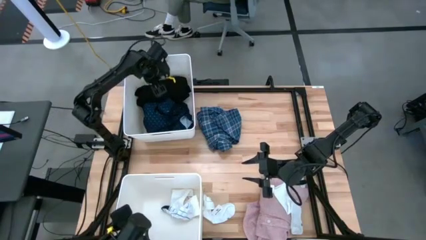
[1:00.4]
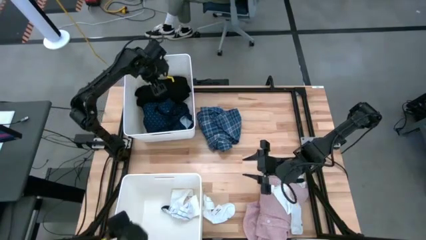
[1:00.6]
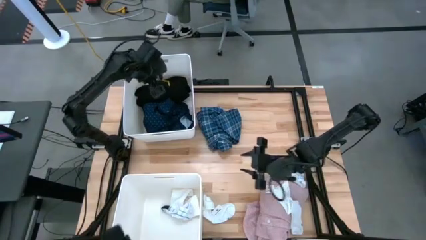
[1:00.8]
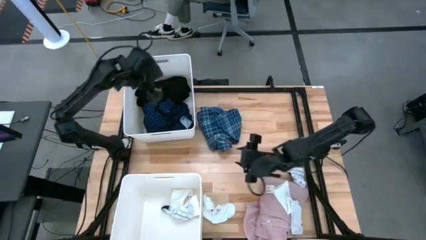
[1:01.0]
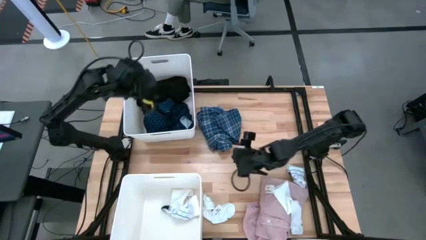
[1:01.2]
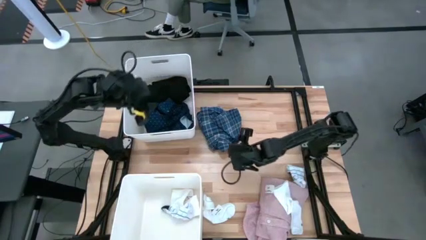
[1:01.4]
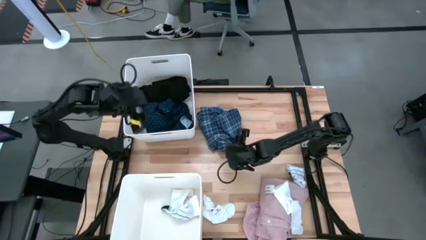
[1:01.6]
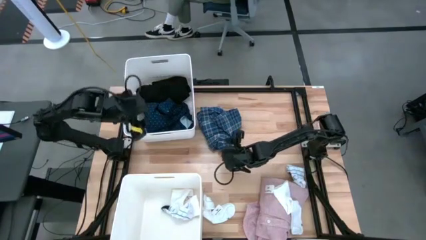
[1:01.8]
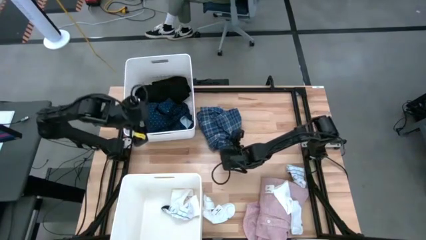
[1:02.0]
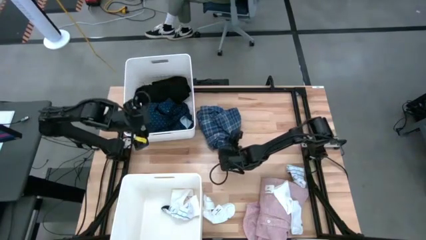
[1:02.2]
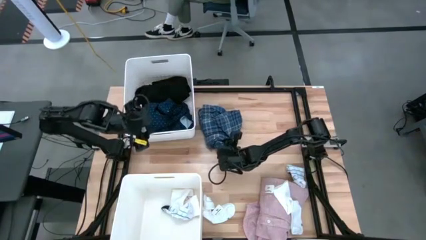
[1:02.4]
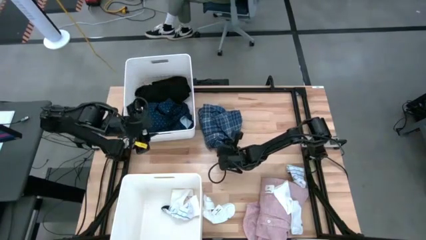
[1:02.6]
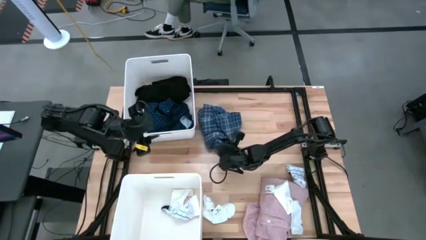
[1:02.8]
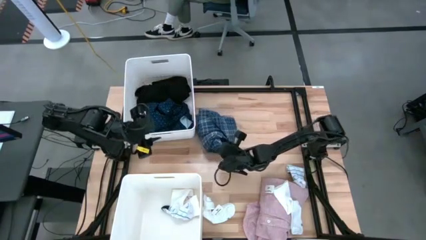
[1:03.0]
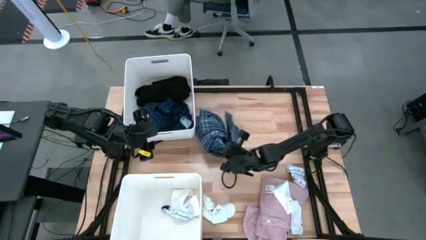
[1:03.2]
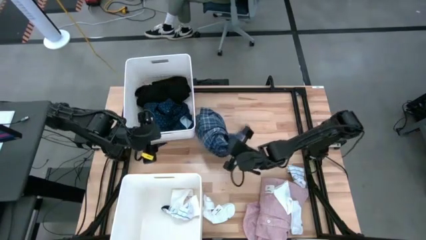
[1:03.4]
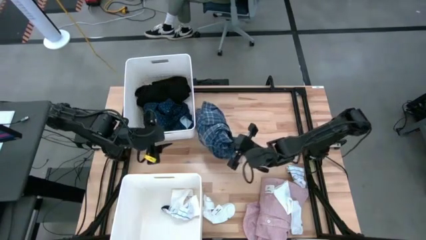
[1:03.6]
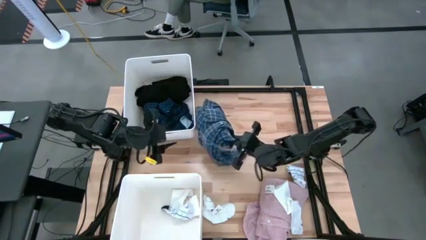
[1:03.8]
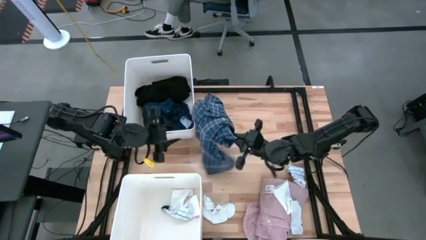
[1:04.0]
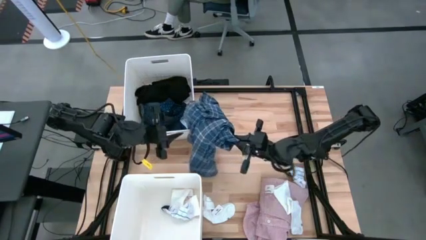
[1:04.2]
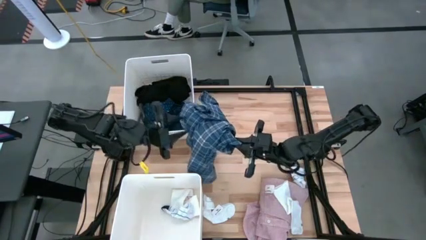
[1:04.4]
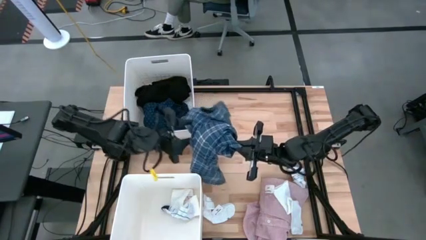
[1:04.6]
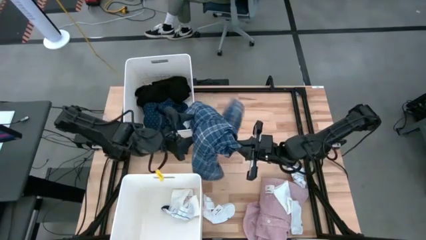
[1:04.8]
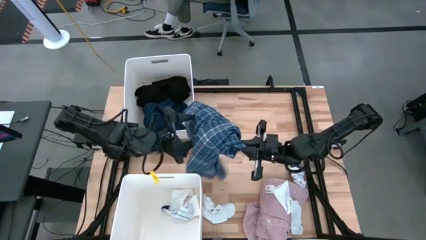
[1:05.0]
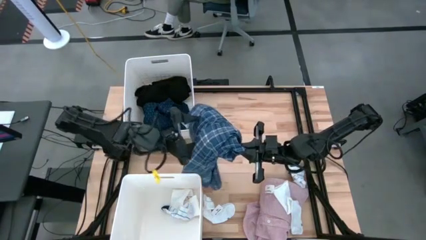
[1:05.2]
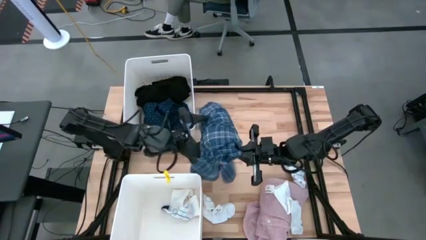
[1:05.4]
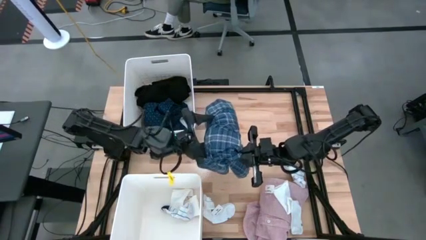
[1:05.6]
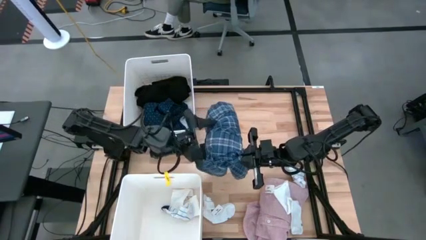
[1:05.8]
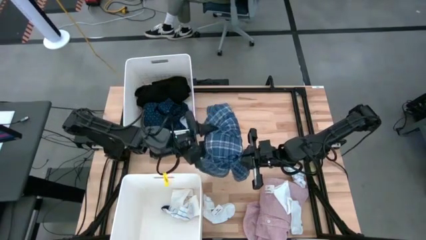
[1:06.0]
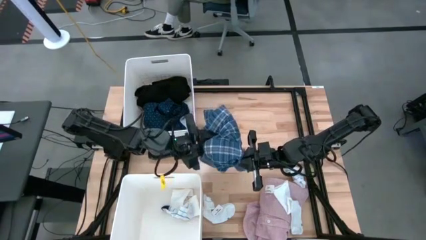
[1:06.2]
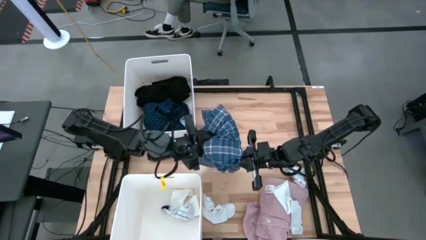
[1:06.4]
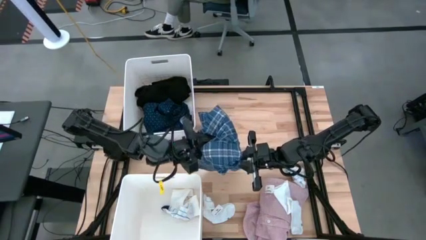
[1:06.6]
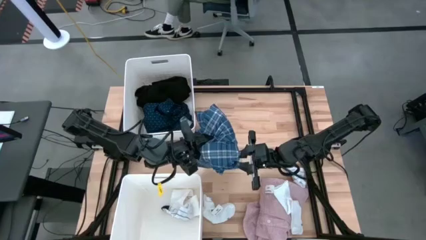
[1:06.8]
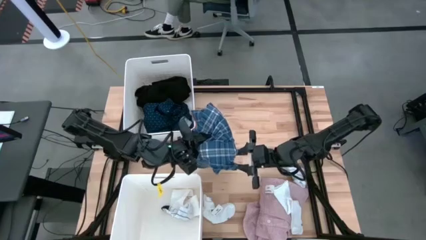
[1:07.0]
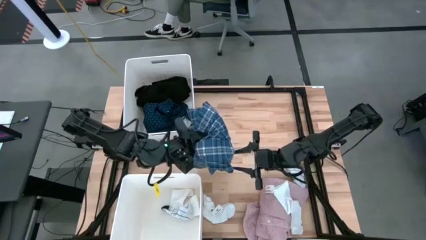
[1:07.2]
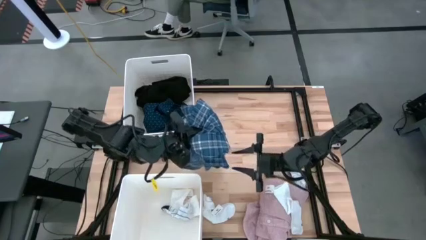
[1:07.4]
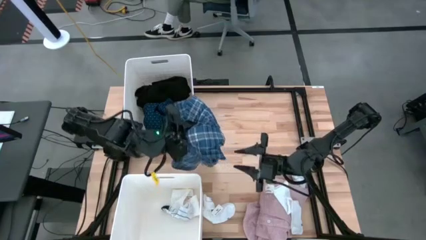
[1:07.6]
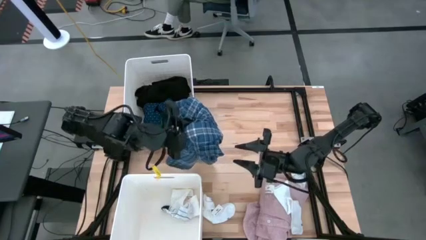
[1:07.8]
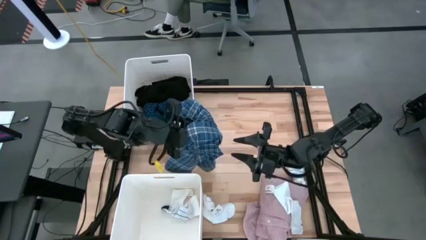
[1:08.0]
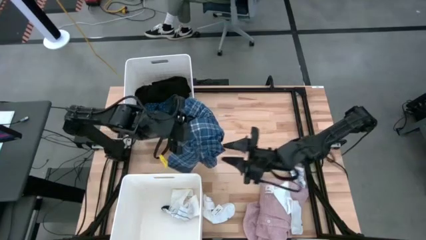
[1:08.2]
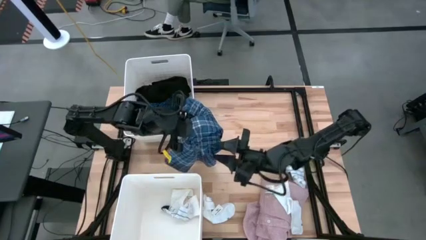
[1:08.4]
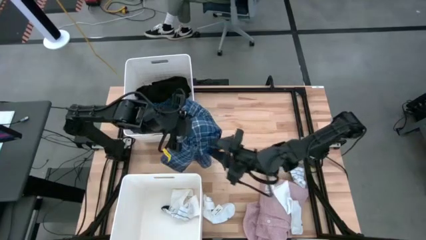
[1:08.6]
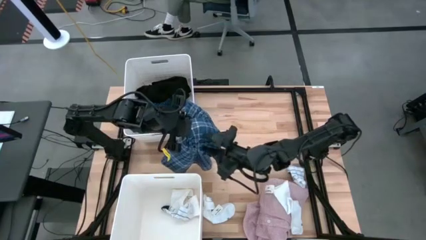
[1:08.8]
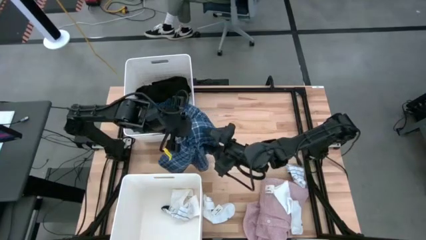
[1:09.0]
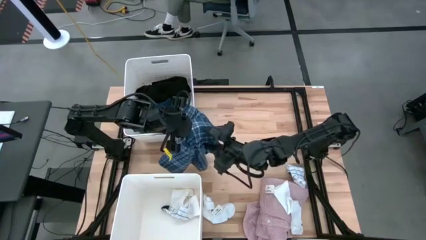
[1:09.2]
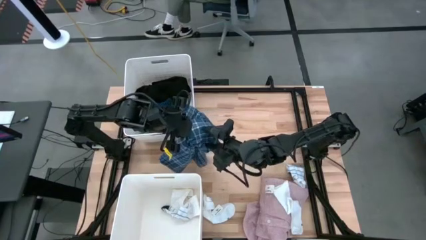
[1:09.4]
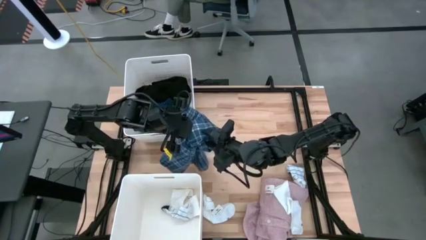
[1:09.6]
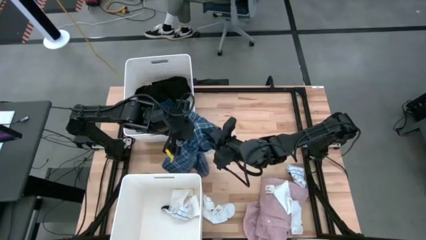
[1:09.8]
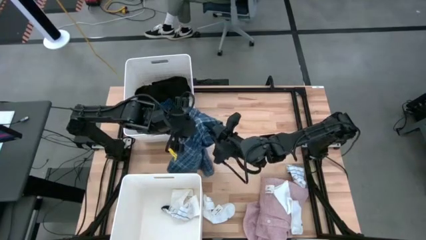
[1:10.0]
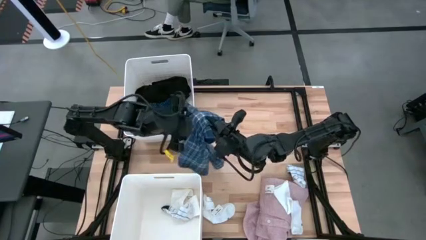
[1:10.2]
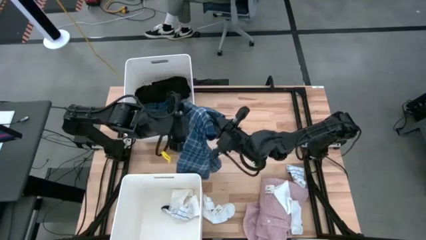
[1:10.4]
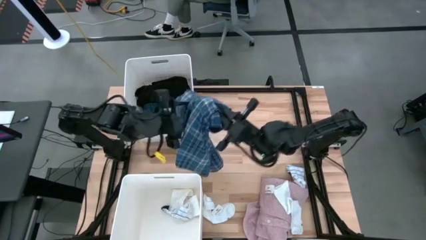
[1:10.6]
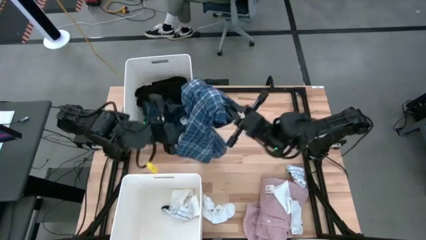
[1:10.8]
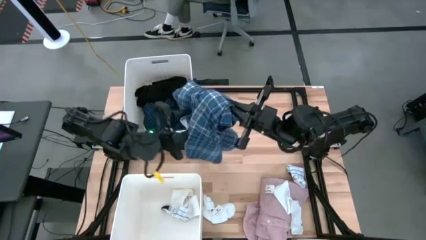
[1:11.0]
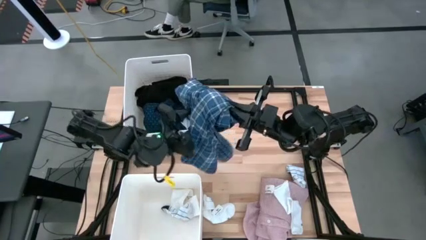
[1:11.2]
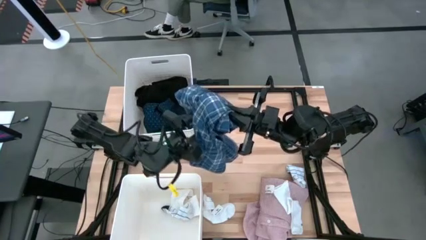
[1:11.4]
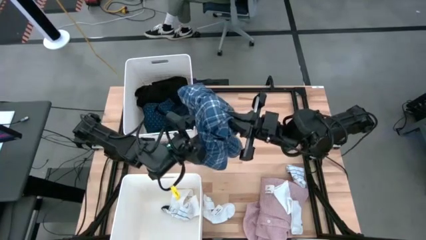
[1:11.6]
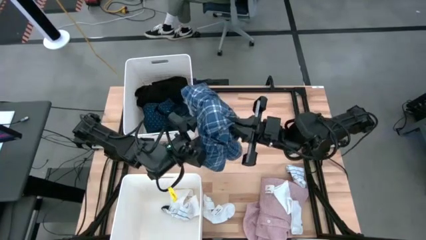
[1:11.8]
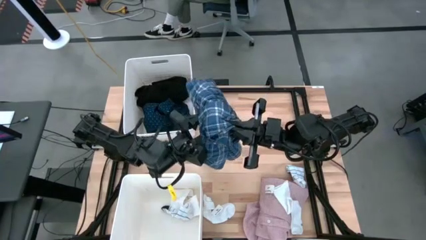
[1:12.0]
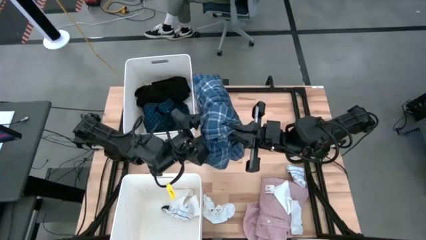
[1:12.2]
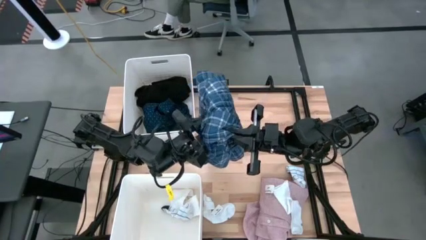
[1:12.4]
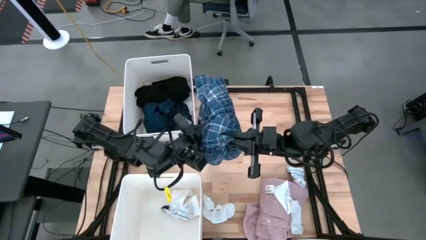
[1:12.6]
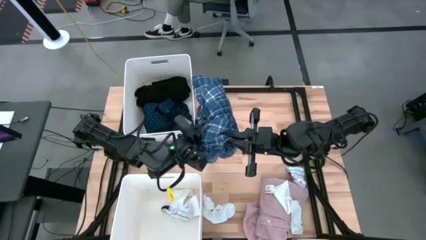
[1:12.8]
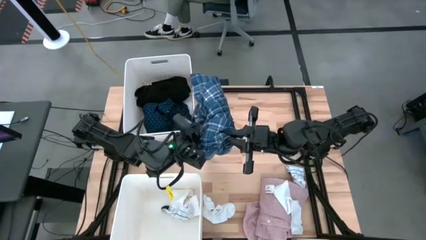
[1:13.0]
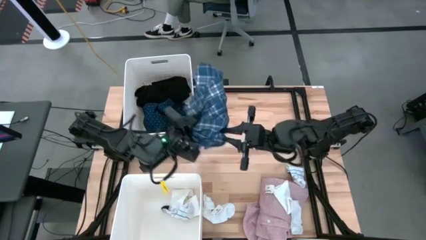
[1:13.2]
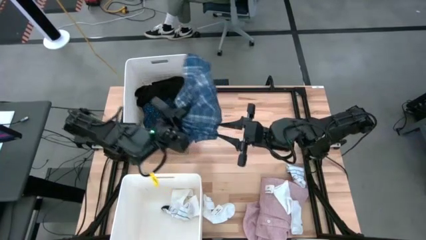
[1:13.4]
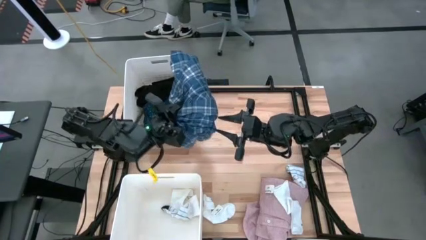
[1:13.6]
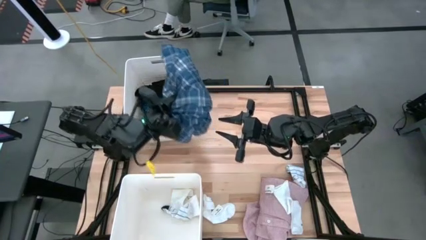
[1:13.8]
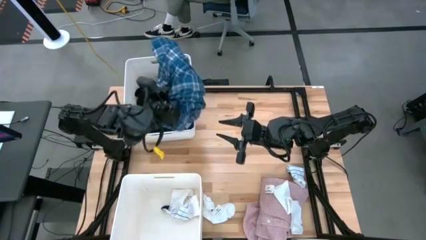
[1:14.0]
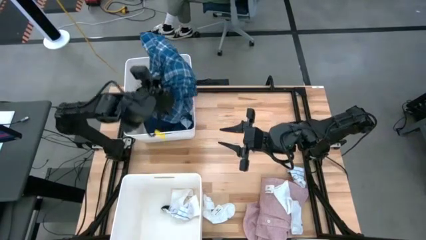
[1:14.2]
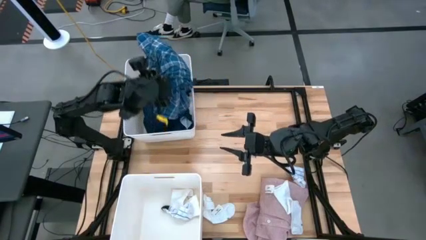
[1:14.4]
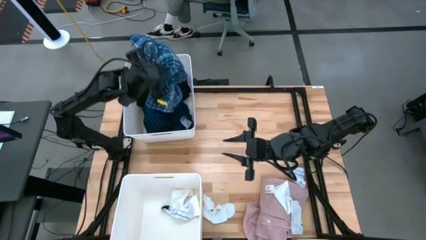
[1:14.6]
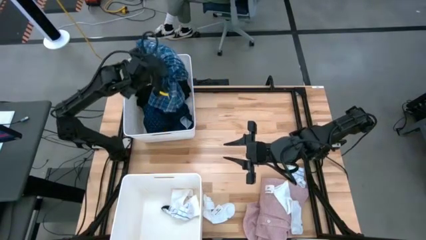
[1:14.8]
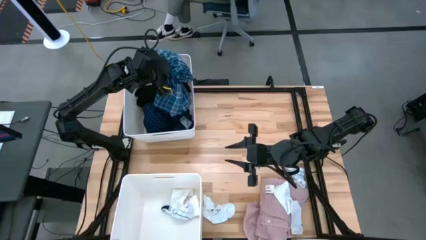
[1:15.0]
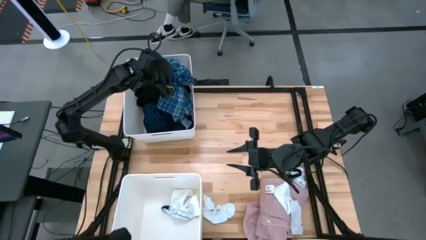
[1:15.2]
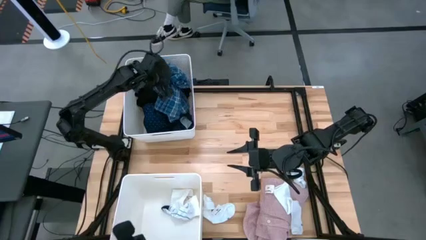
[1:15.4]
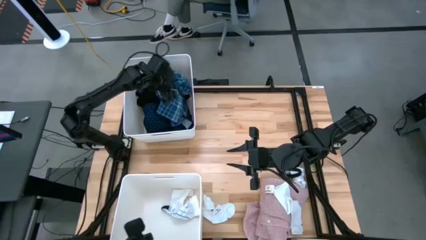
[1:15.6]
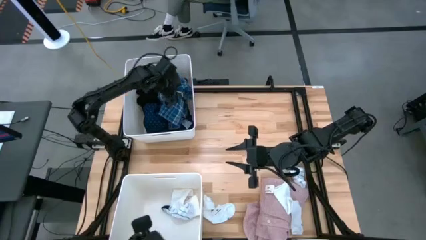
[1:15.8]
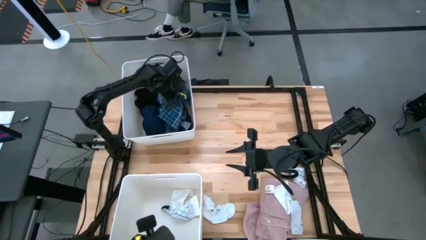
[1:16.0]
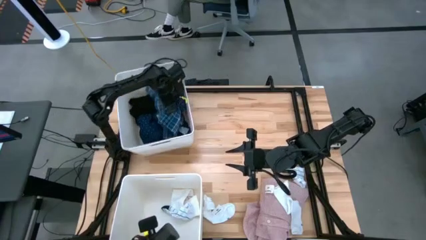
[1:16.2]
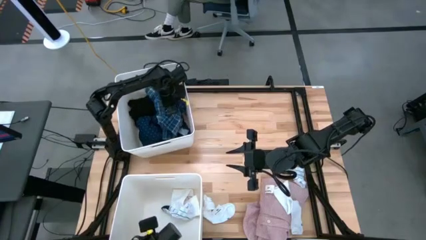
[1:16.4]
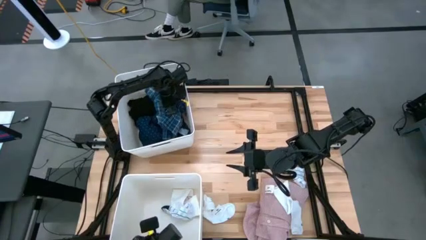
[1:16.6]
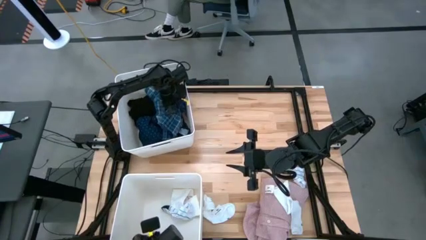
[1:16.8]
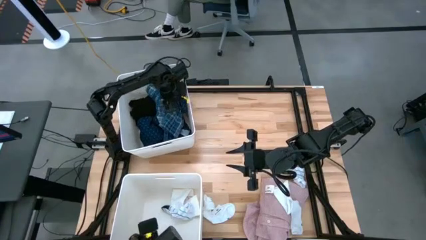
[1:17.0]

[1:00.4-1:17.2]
Task: Sort clothes
Put the blue striped shirt into the top white laundry organizer
